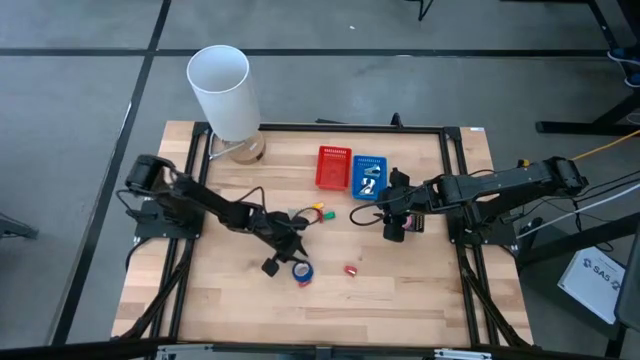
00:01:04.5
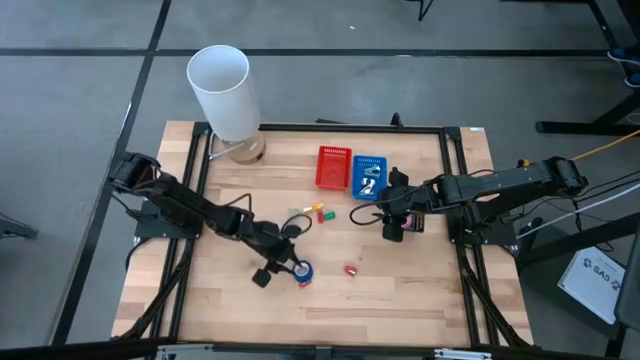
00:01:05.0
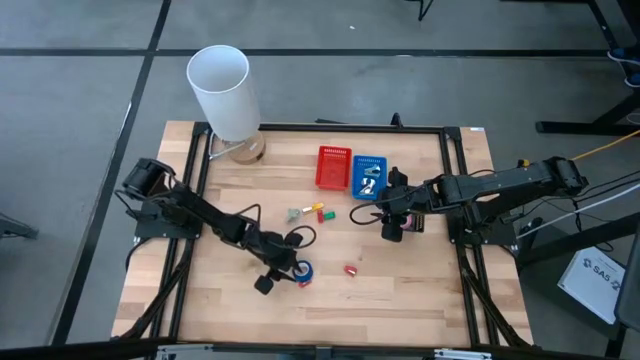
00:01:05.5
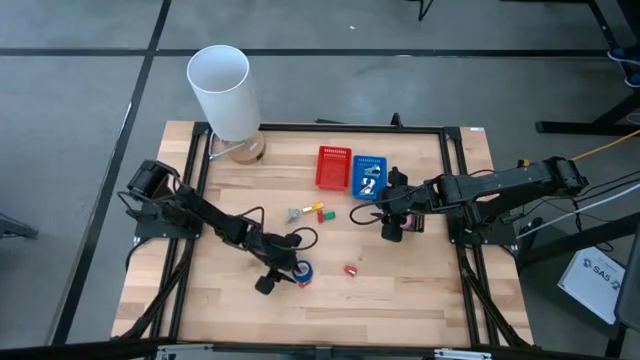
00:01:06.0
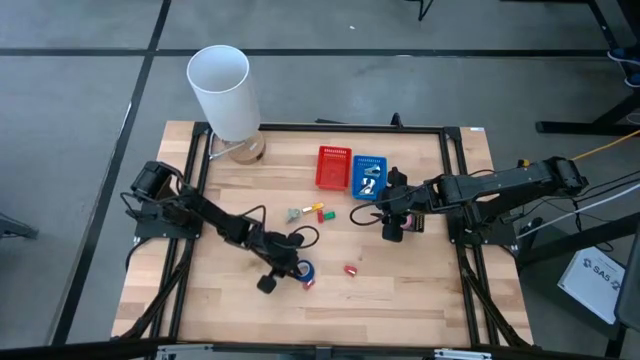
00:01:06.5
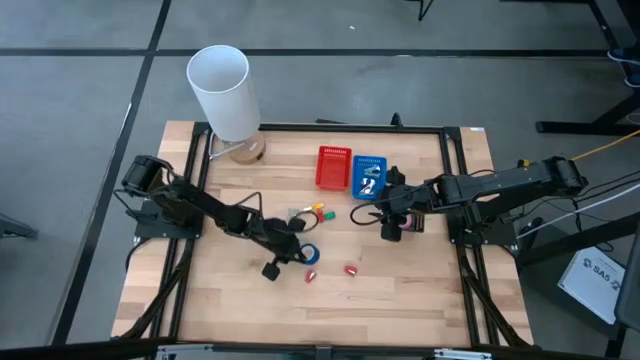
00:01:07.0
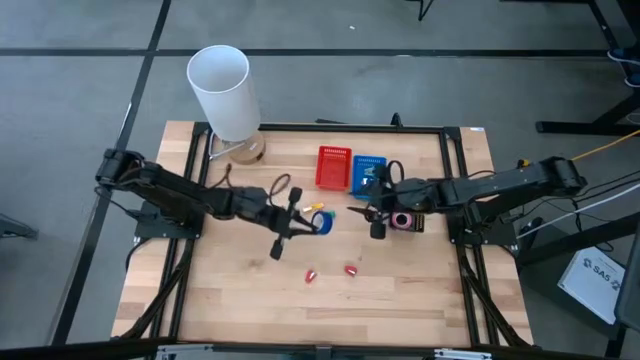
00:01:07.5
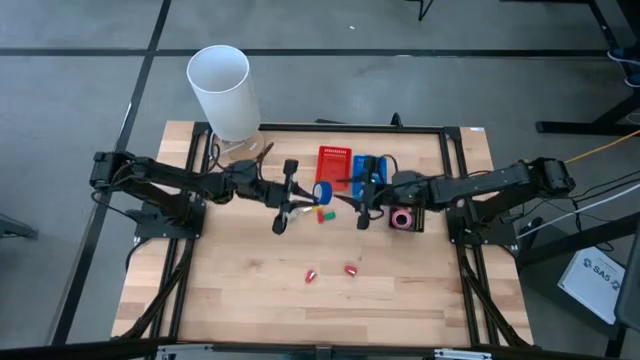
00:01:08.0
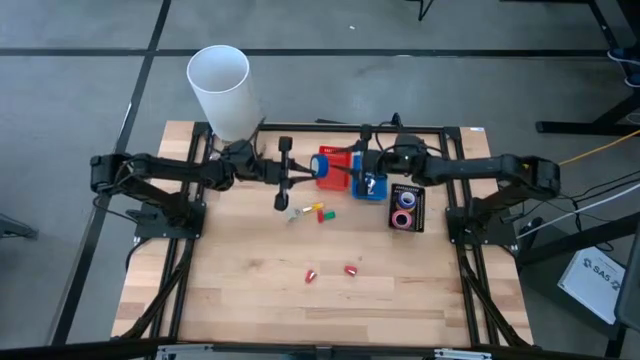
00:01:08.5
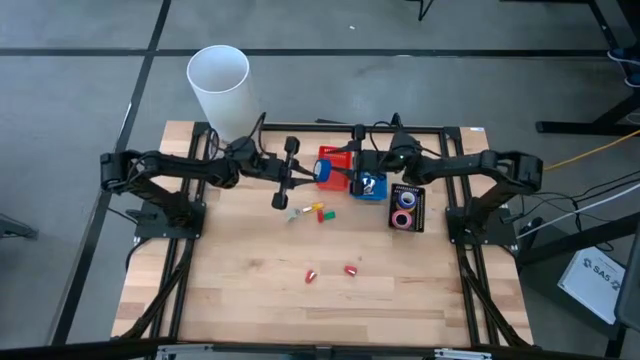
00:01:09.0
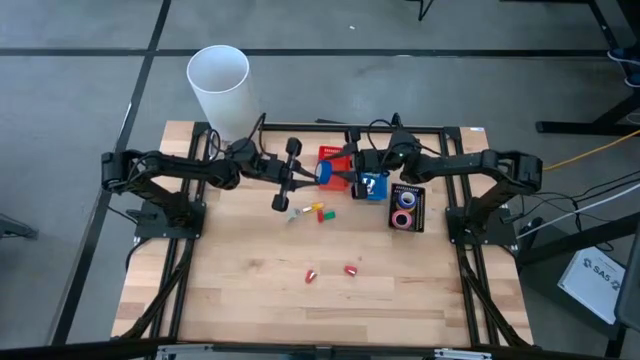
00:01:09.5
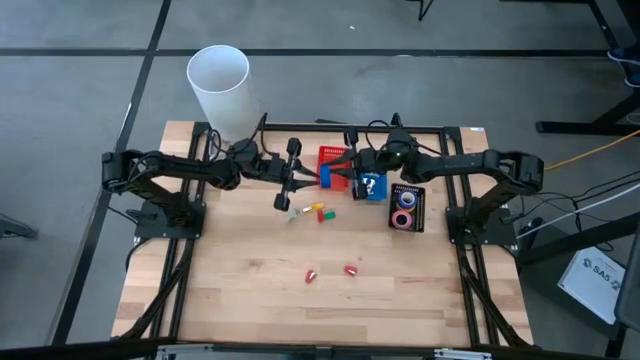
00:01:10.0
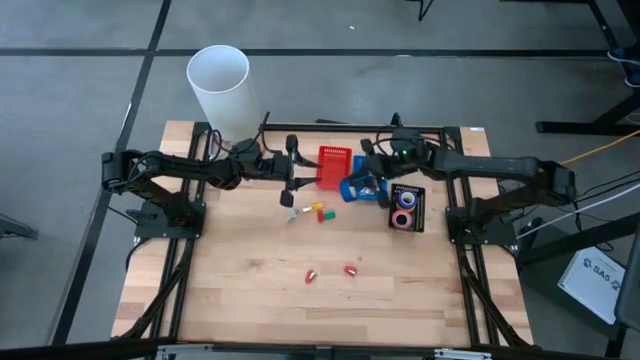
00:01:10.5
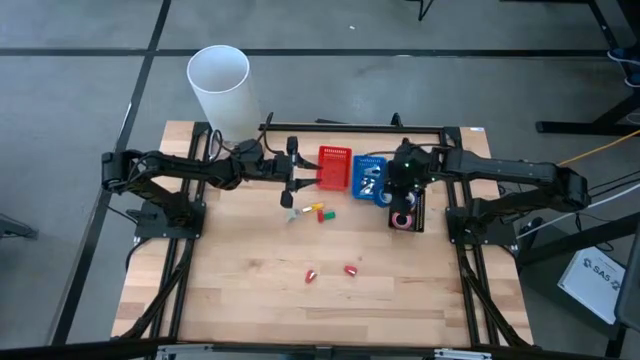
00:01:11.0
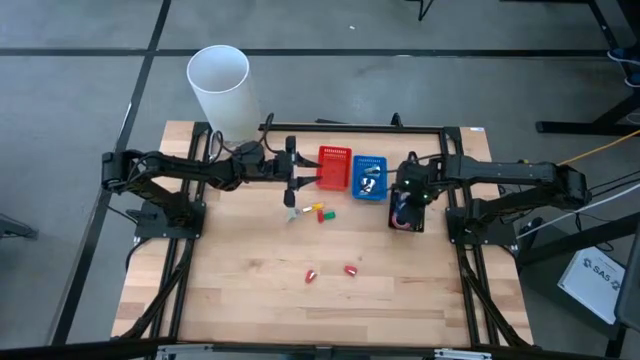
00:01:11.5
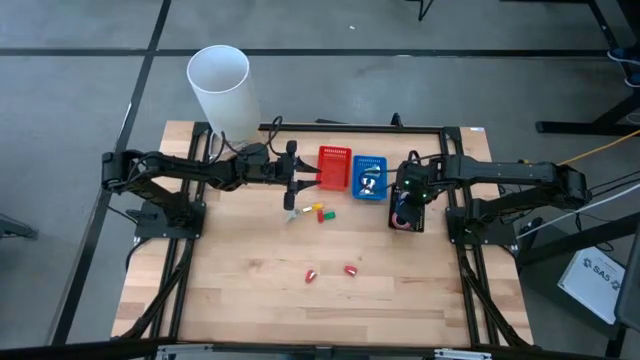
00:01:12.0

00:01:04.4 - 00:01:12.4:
Task: Pick and place Stapler, Stapler remover, tape
Put the blue tape into the black bin

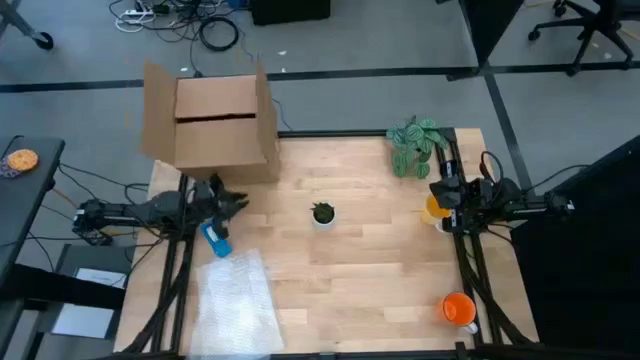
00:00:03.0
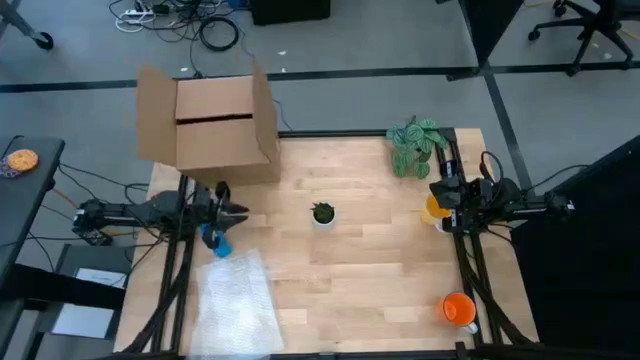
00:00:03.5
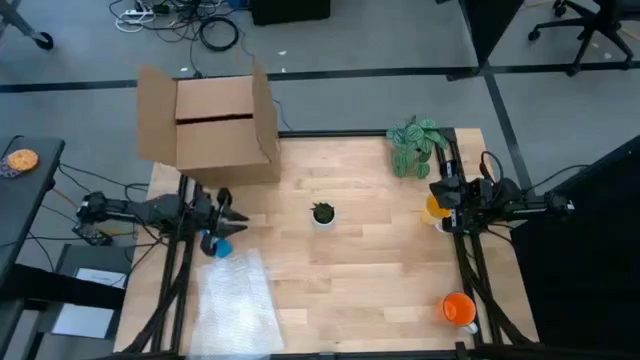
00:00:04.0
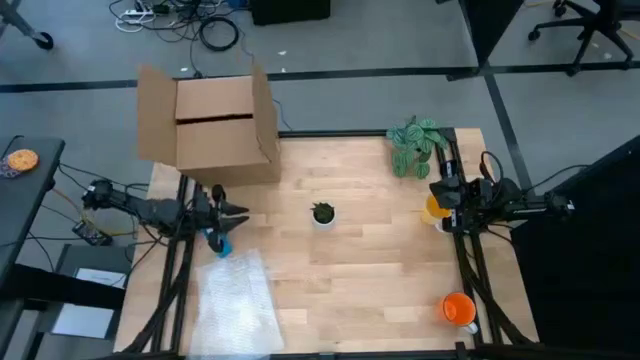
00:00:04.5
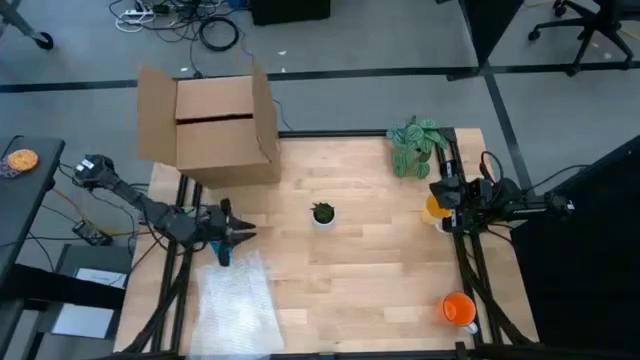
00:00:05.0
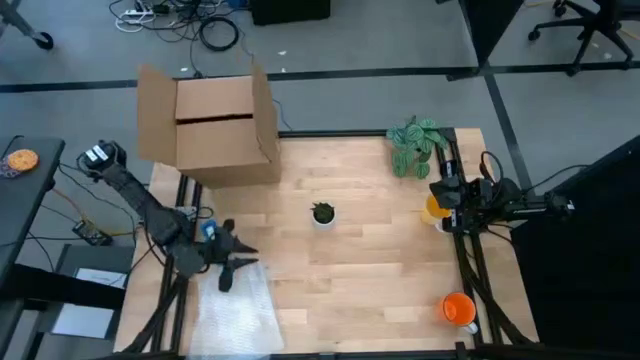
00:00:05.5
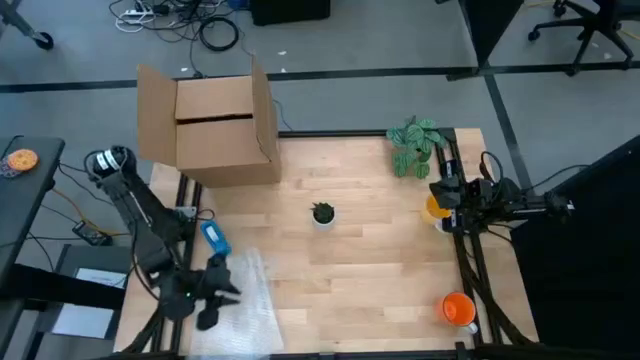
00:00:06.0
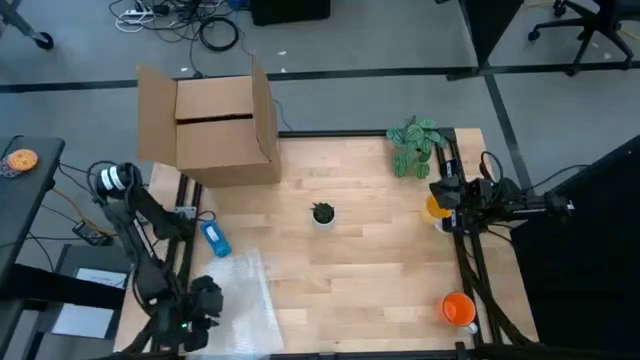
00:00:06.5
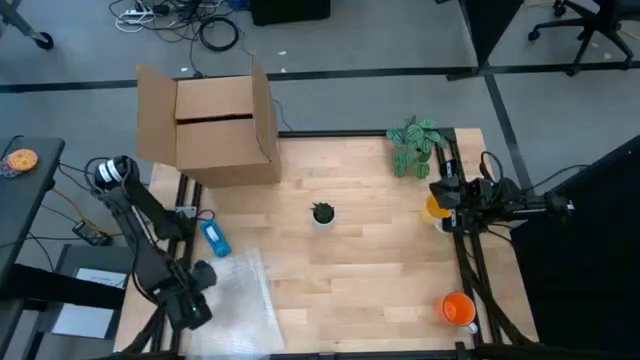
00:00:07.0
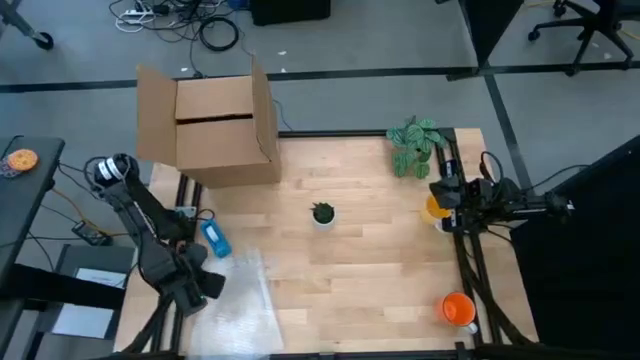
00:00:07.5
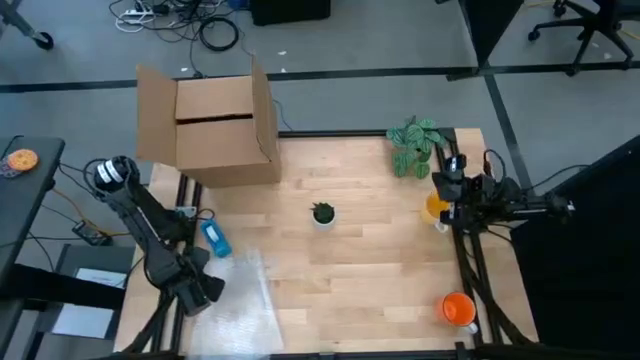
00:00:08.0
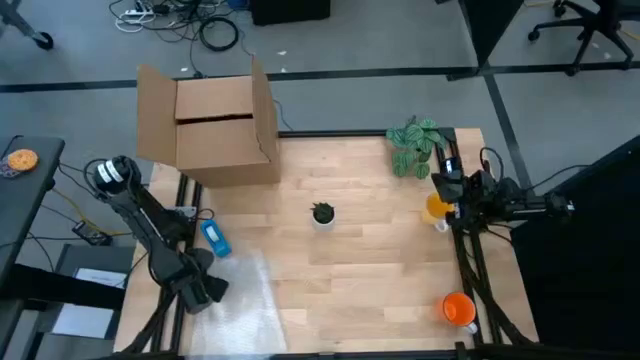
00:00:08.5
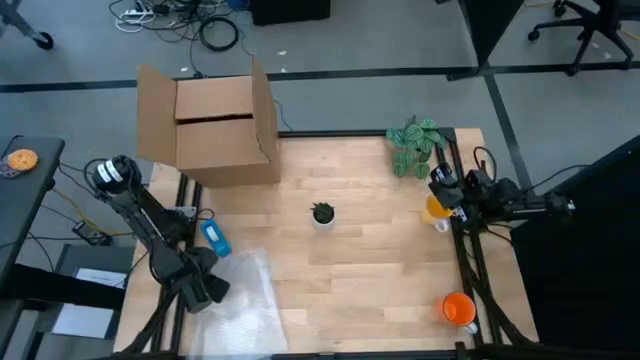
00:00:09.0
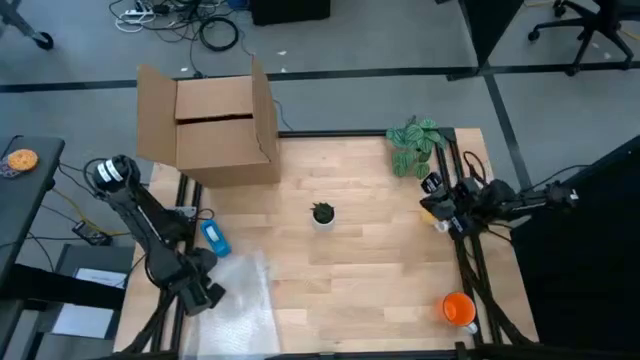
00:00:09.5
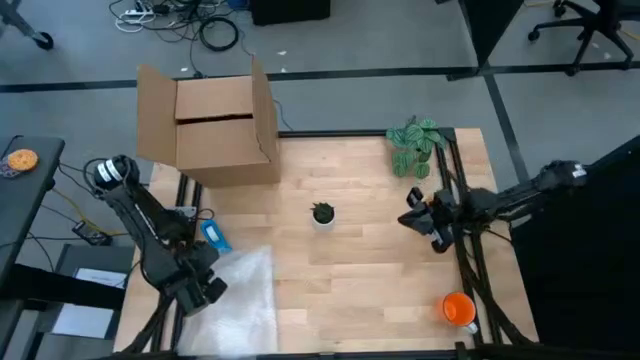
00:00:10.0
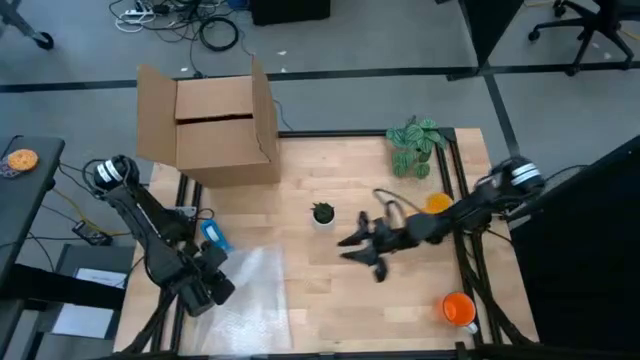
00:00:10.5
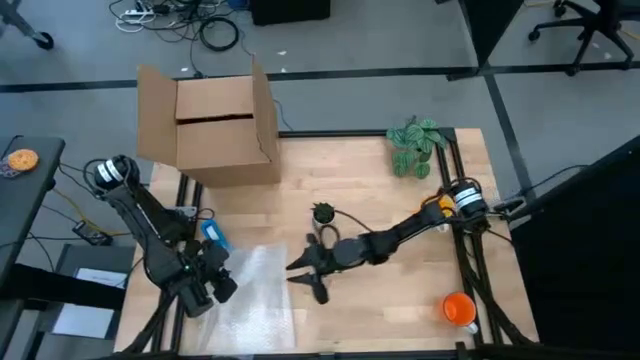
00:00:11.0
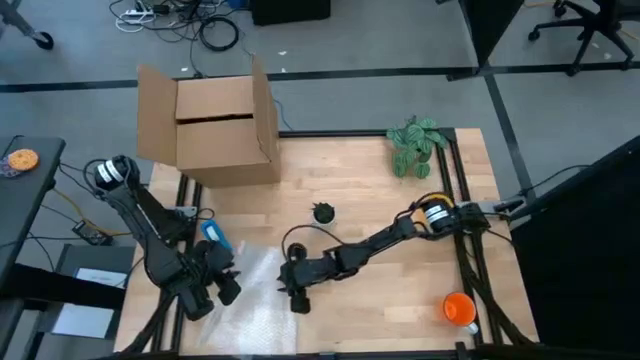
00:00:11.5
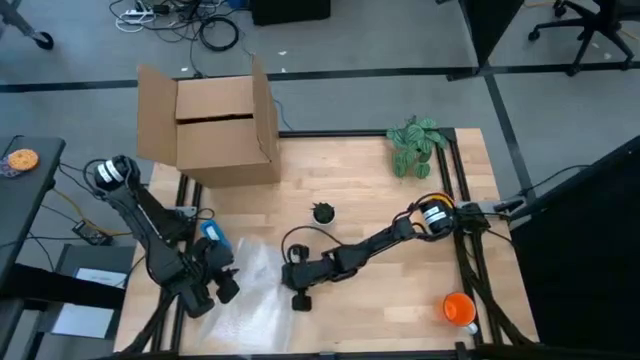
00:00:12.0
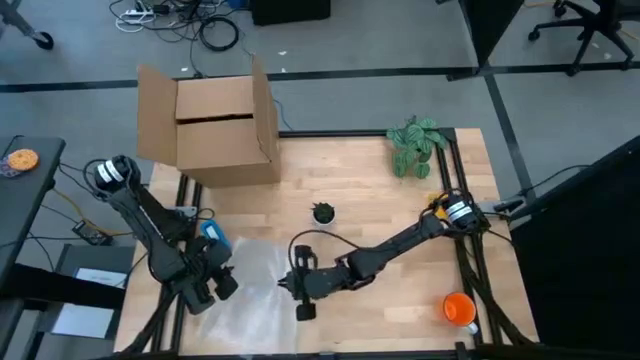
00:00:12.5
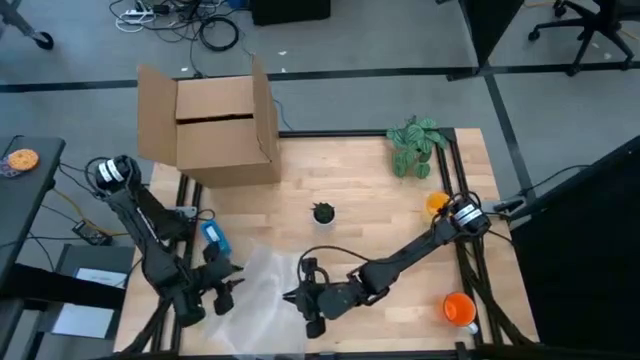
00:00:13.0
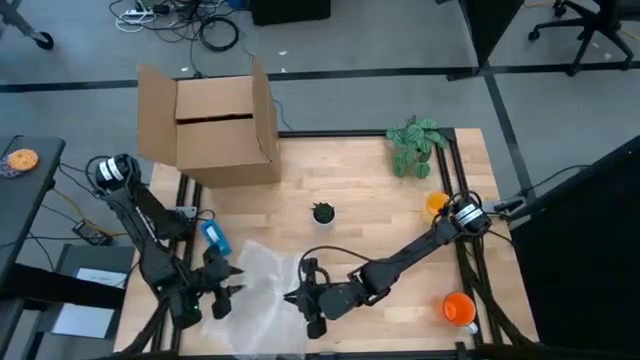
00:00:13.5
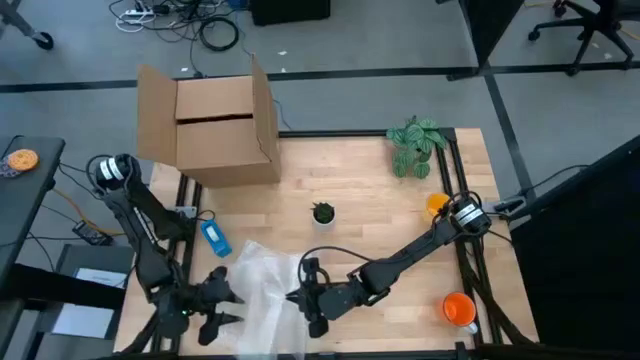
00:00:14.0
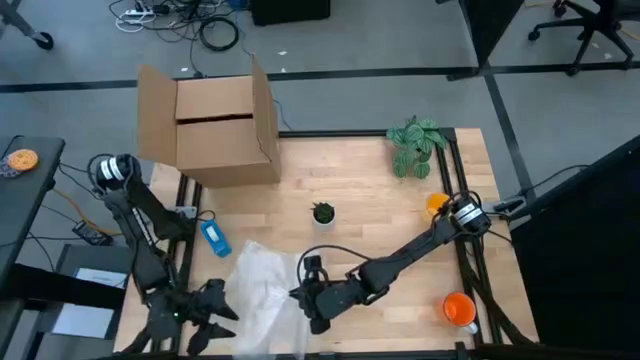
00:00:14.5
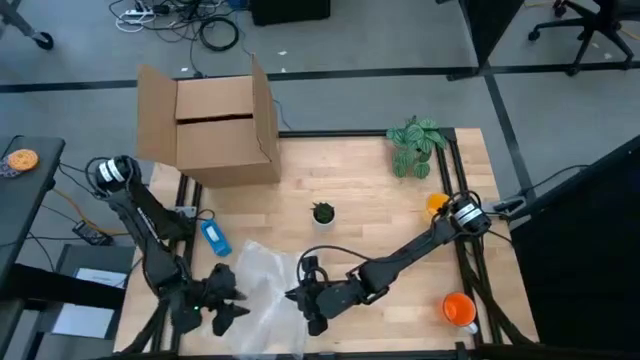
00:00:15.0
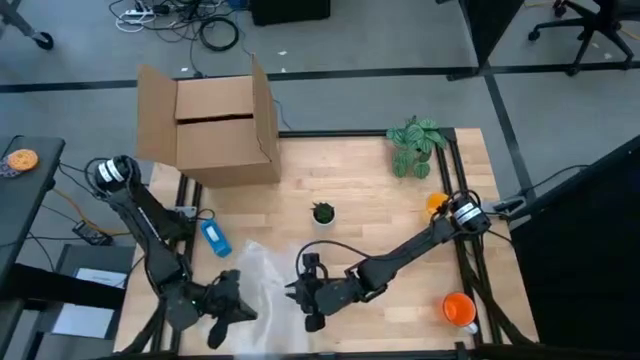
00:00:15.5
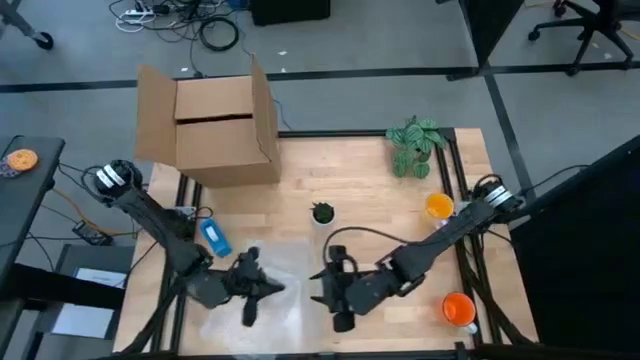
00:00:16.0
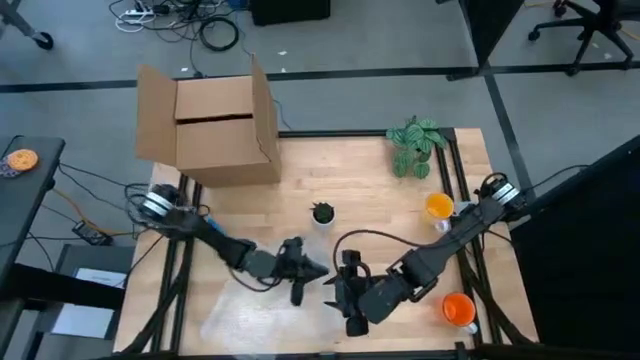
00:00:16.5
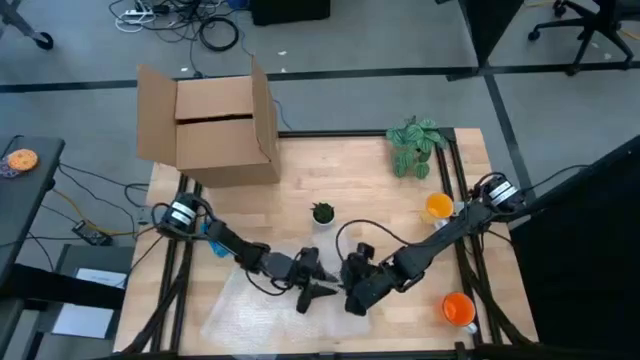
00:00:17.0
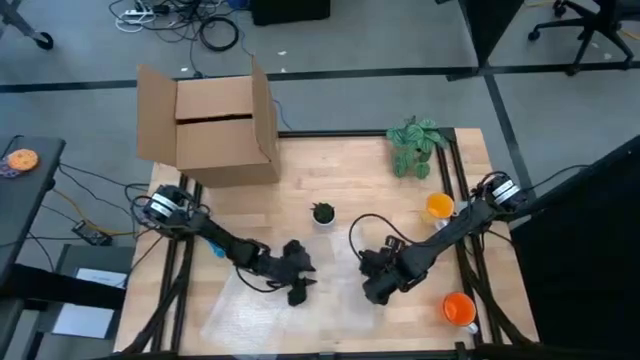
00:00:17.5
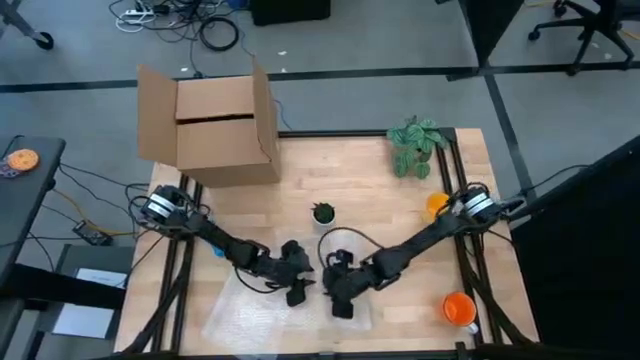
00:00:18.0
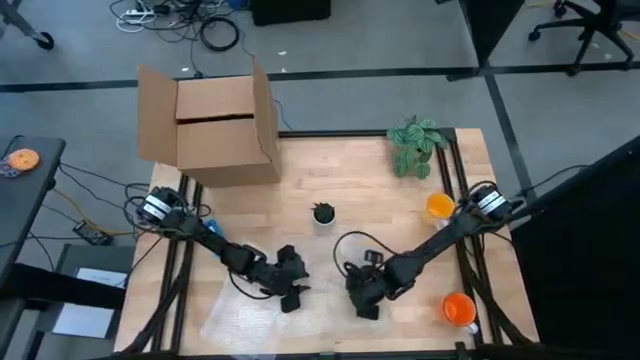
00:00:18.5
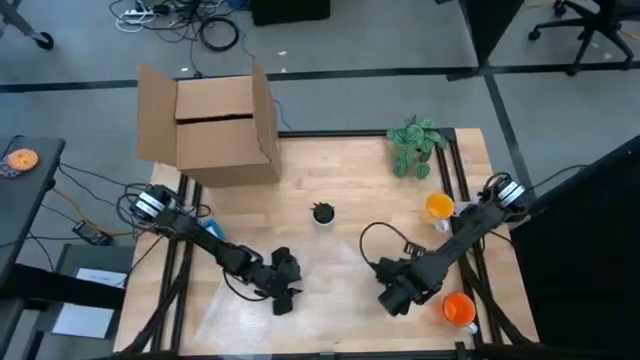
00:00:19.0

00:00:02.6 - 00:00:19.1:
Task: wrap mug
Prepare the transparent bubble wrap
